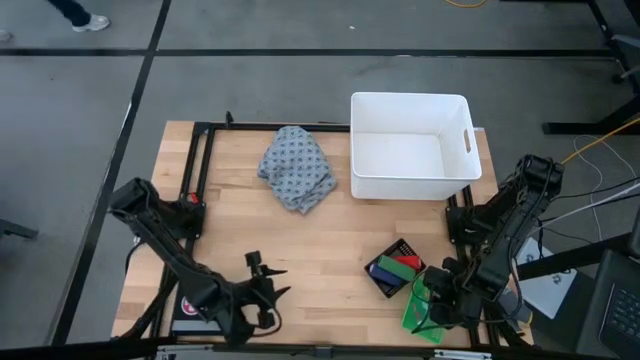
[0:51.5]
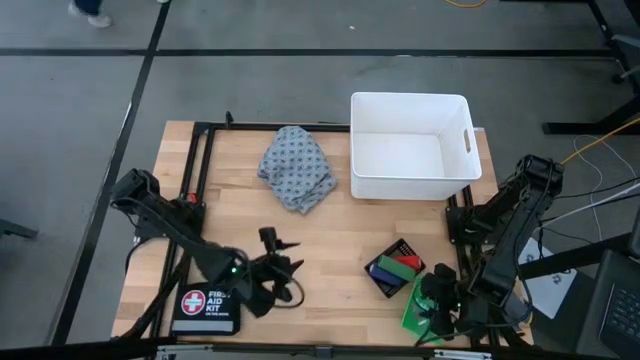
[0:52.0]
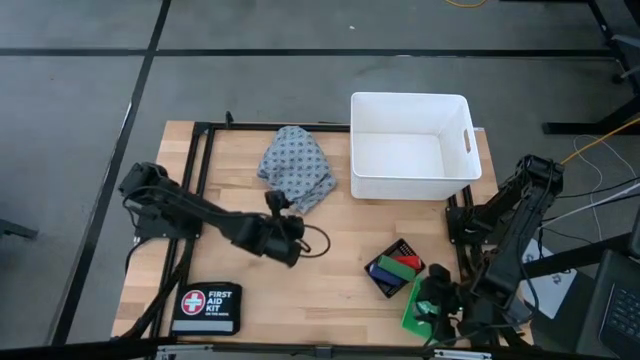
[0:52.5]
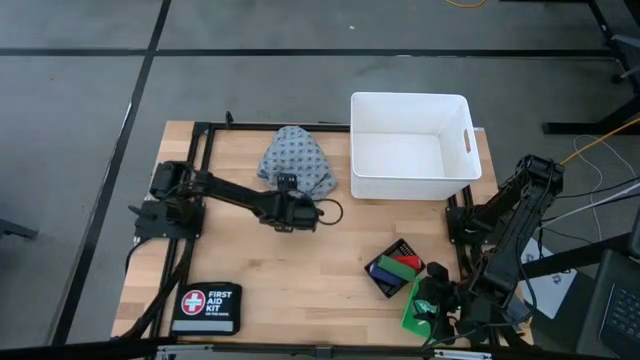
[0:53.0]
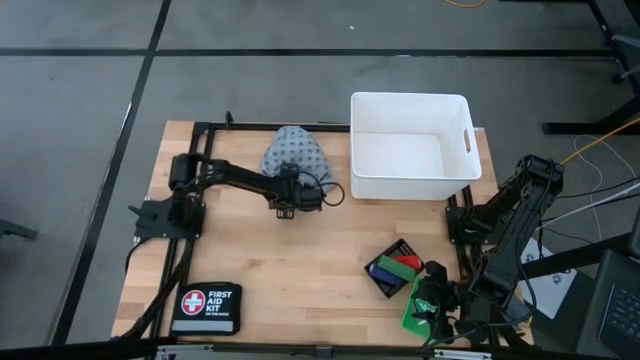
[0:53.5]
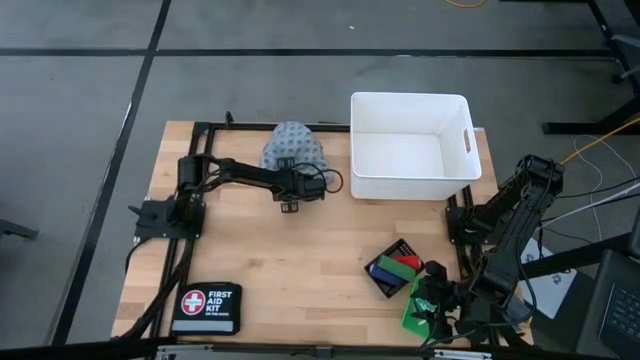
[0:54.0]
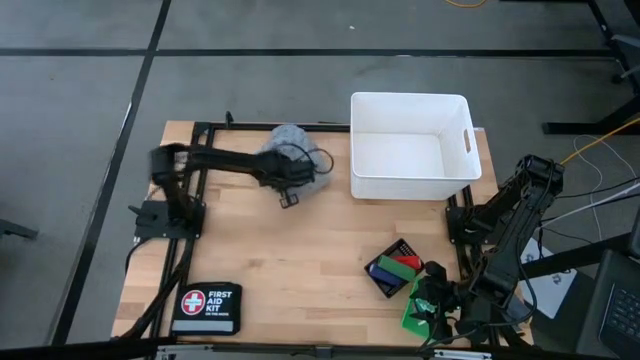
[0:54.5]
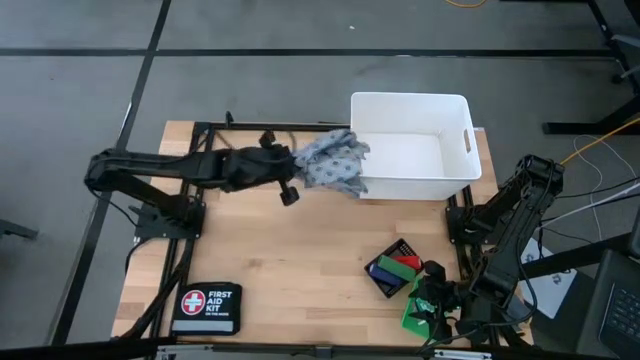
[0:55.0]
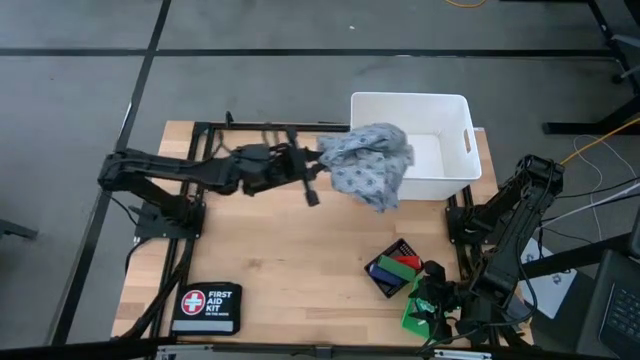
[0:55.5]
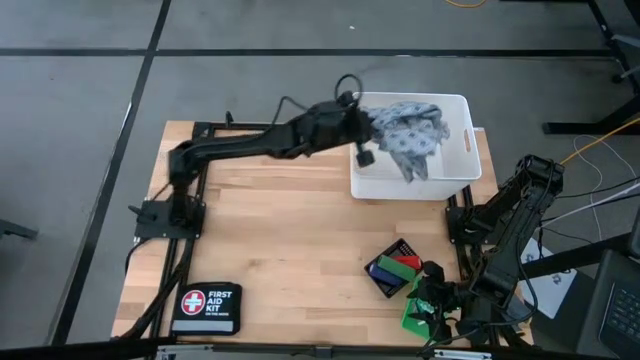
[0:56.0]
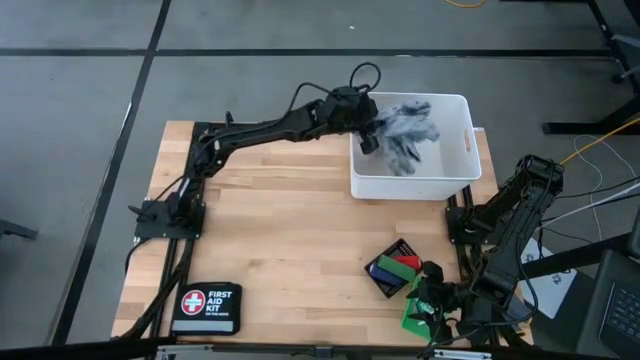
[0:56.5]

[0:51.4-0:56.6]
Task: Pick & Place Medicine items
Put the white cloth into the white bin

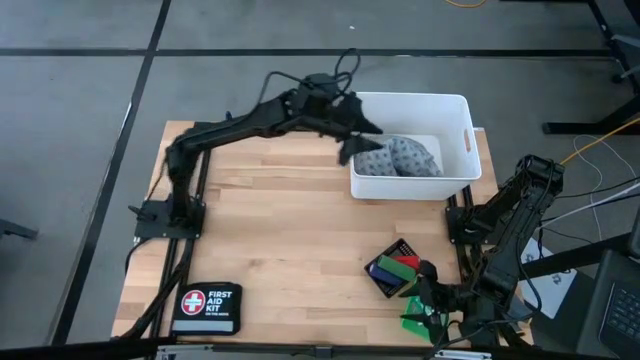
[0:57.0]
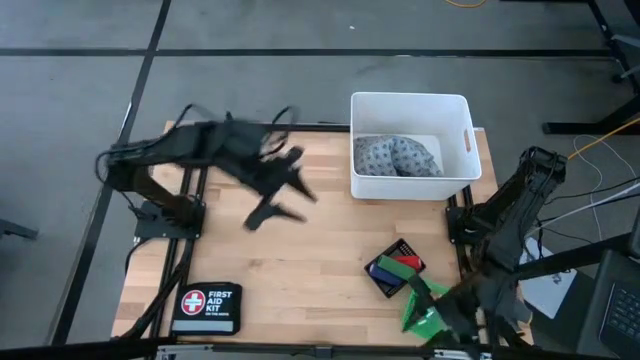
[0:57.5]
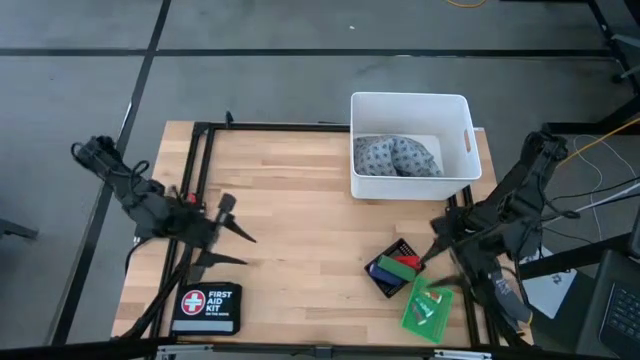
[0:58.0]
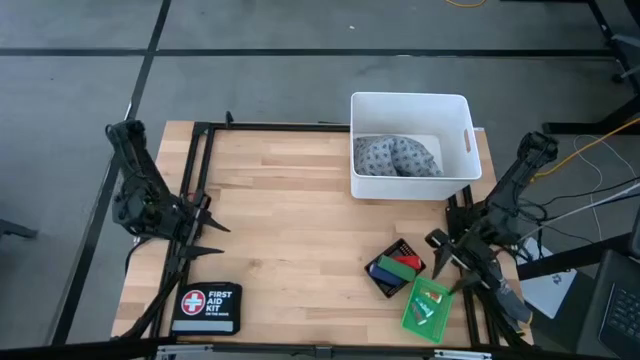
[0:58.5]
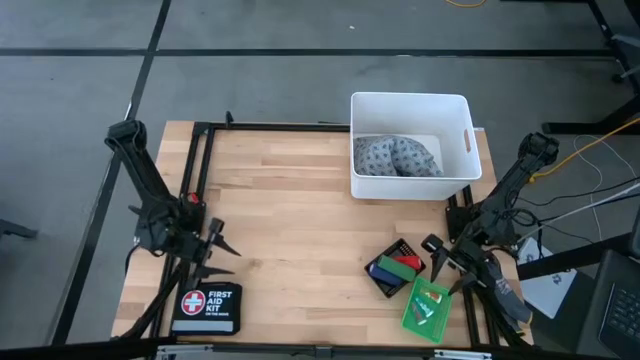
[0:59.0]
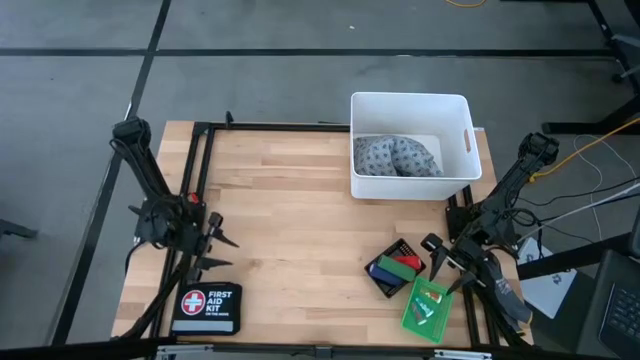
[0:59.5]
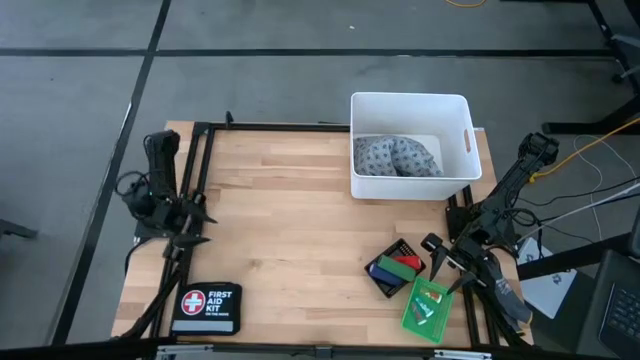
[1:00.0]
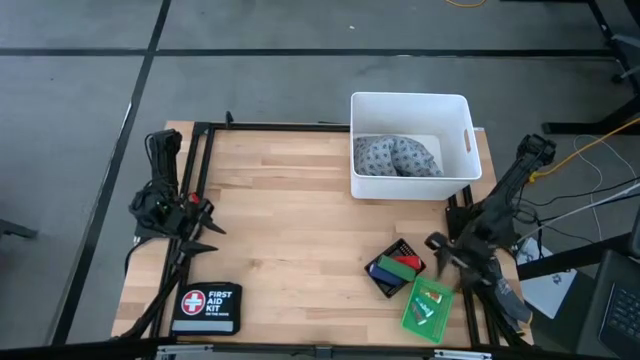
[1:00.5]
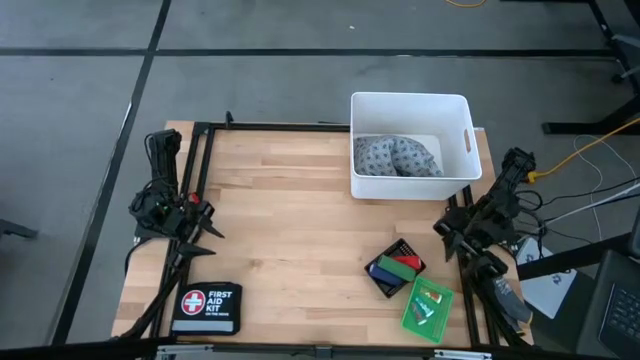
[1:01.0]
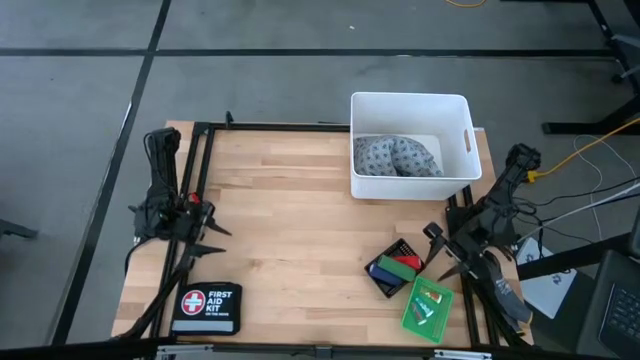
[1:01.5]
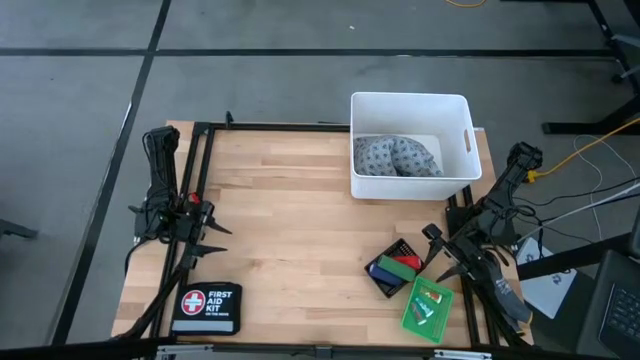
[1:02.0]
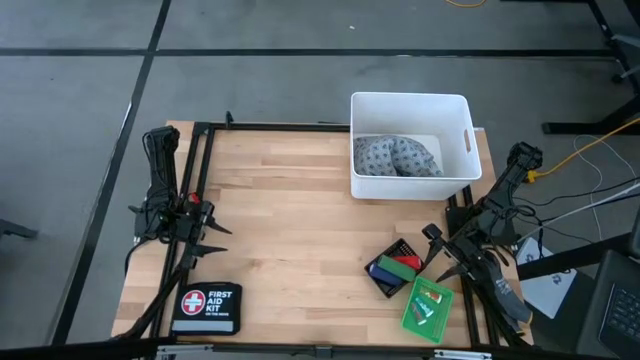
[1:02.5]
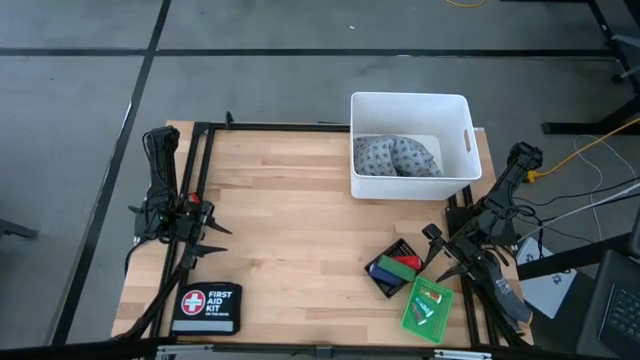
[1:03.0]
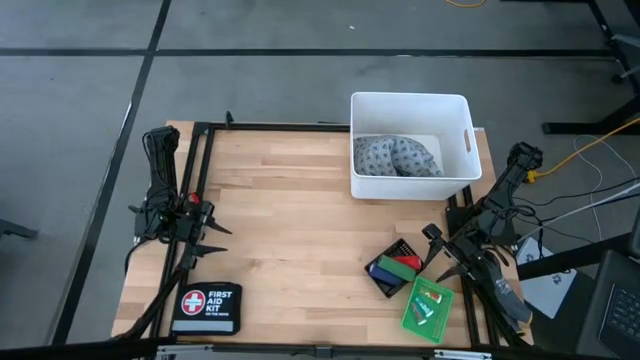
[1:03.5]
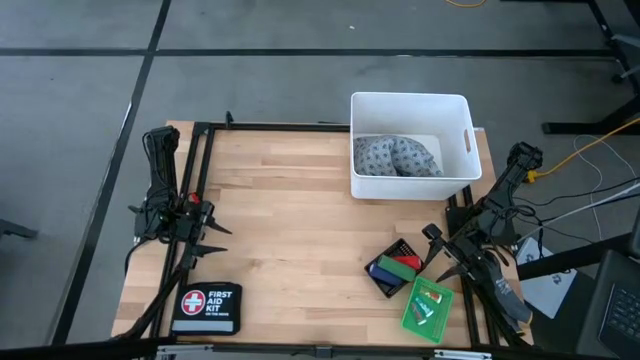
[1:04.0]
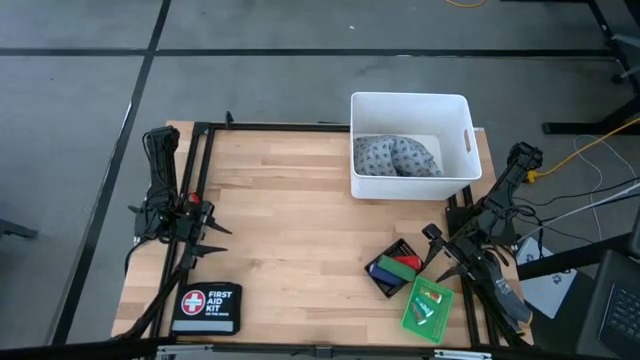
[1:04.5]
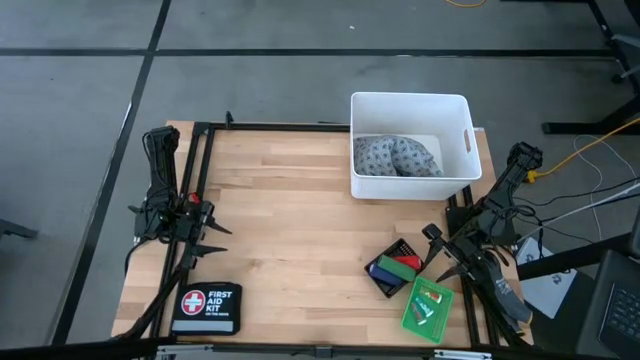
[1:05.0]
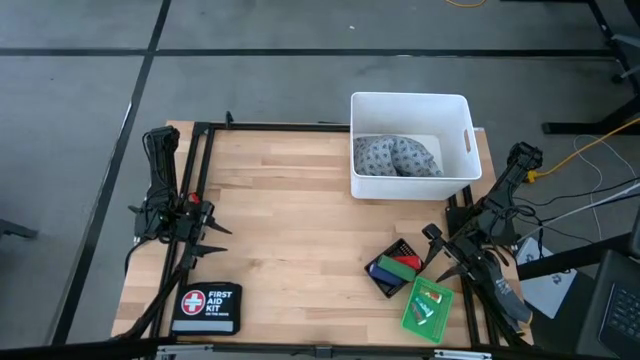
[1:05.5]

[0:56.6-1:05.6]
Return to Home Position

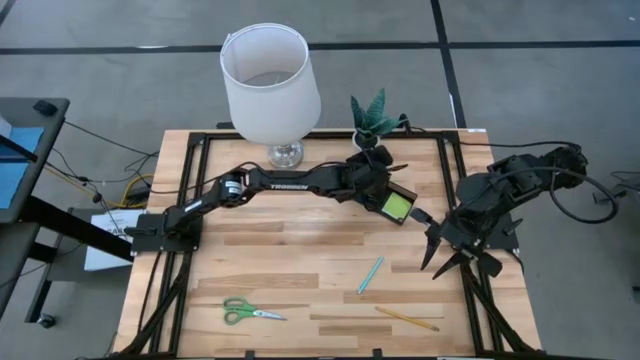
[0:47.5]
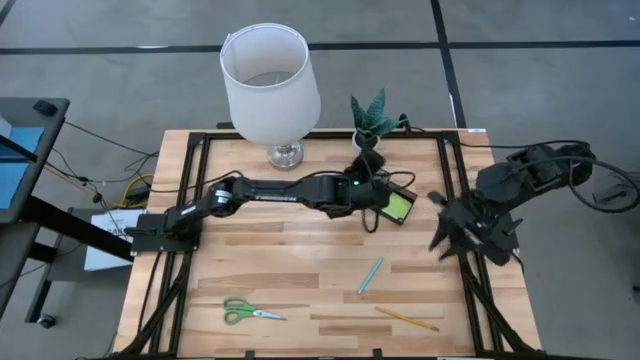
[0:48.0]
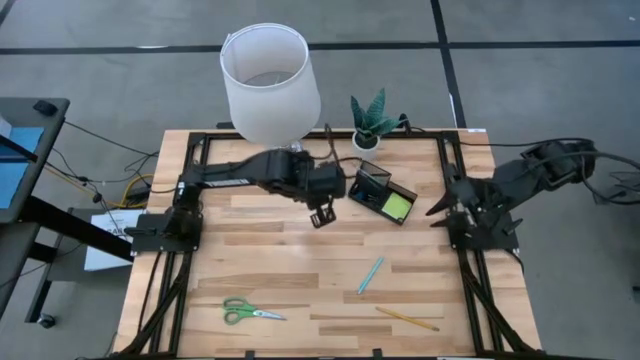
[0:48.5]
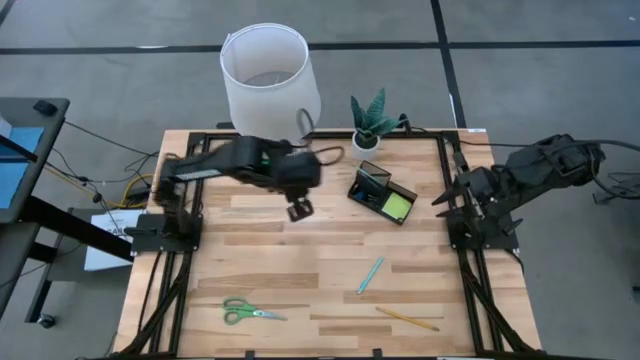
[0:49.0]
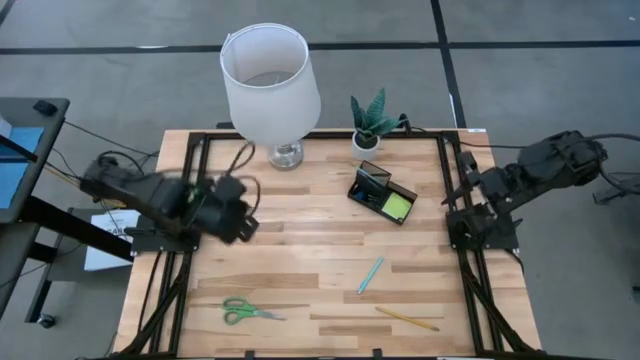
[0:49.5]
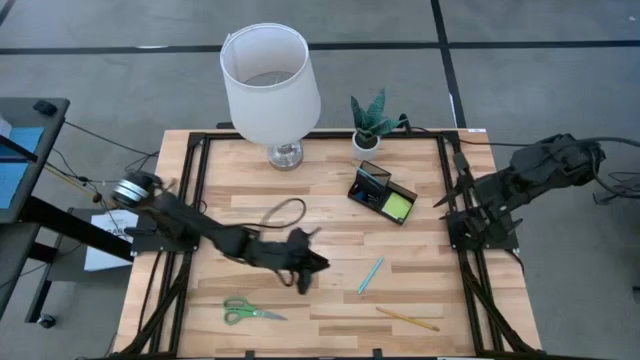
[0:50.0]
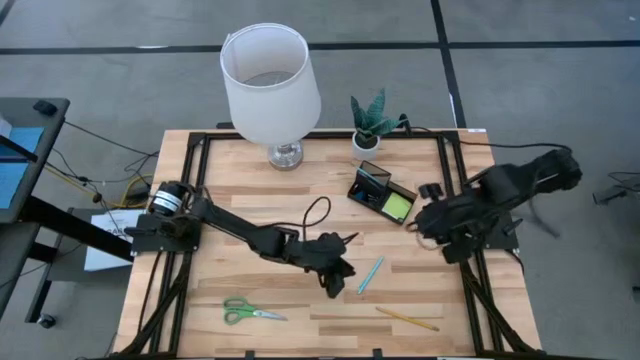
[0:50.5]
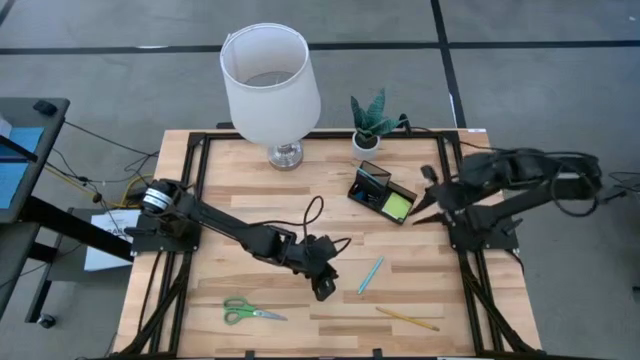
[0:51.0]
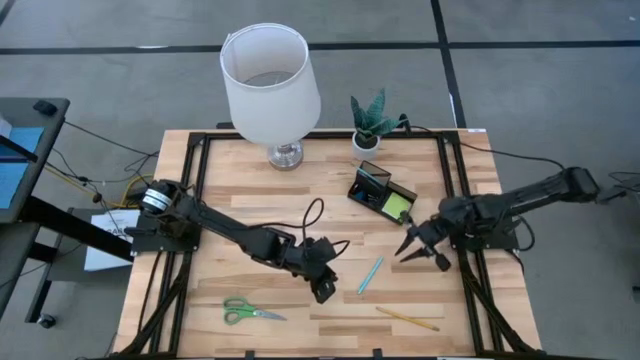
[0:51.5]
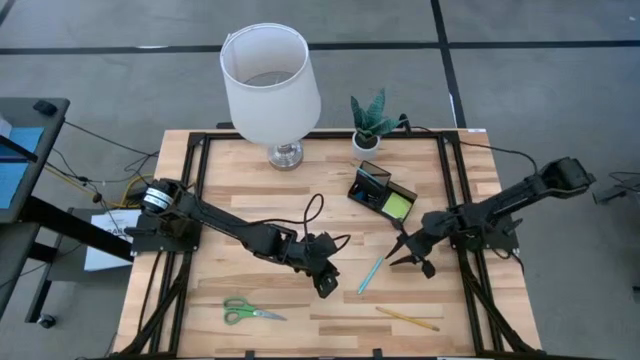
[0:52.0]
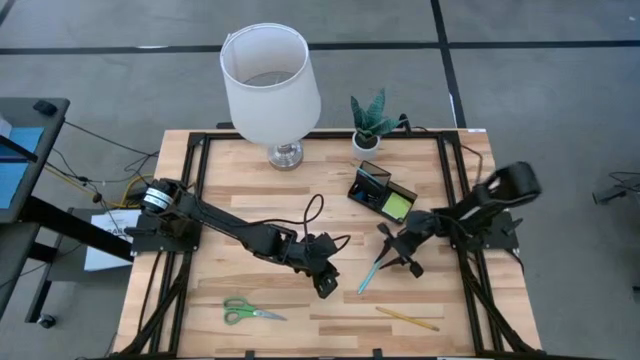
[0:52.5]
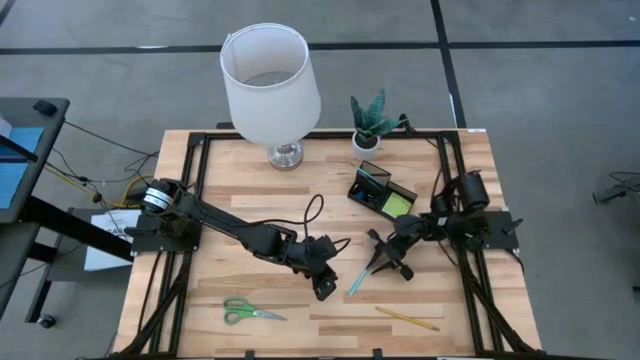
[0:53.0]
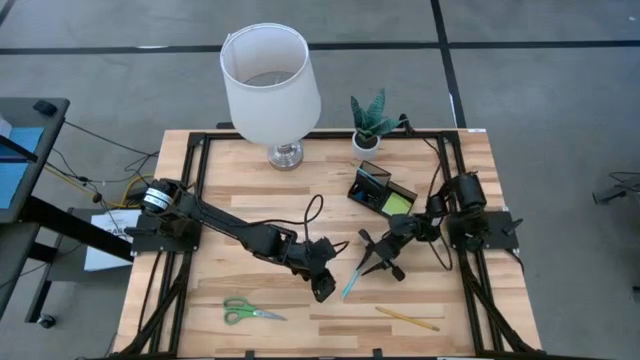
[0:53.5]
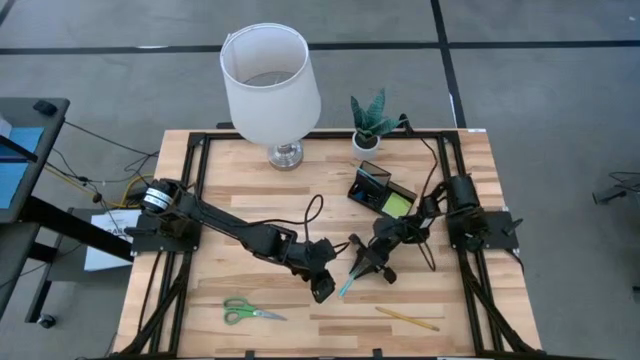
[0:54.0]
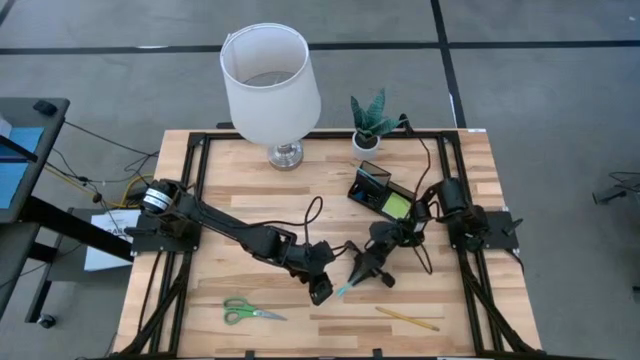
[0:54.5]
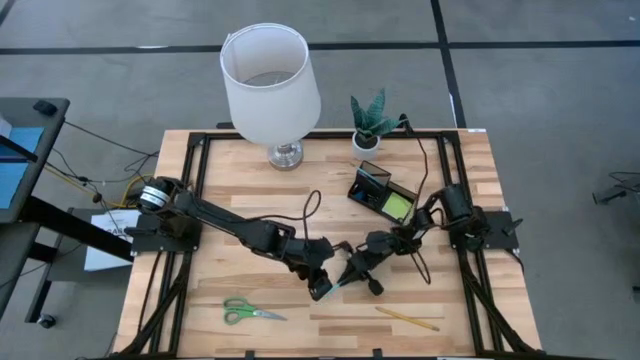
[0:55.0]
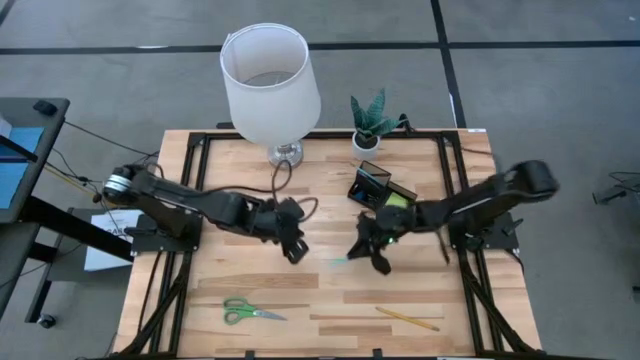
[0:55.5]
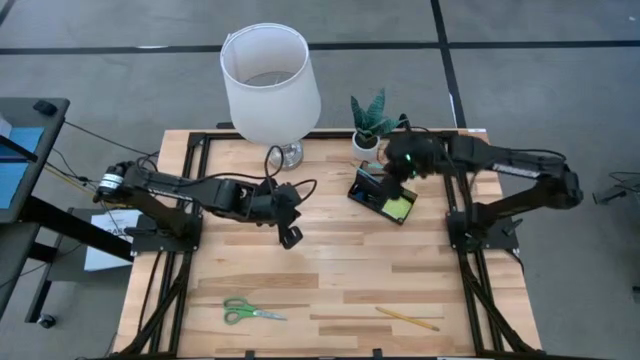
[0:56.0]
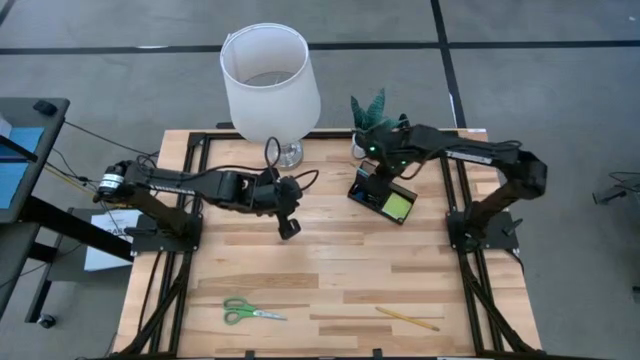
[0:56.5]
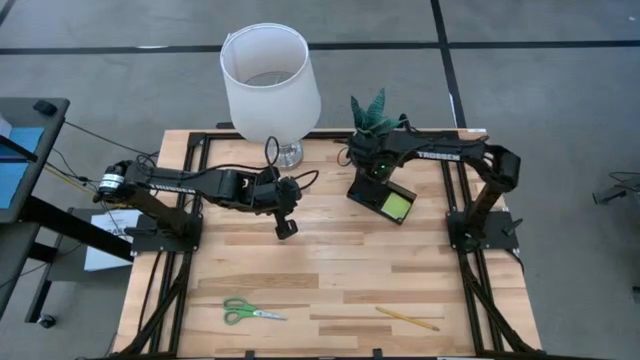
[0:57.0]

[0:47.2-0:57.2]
Task: Pick and place office supplies into organizer
Put the light blue pen into the black organizer
